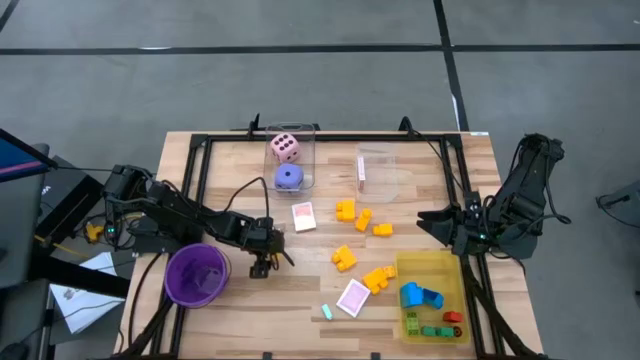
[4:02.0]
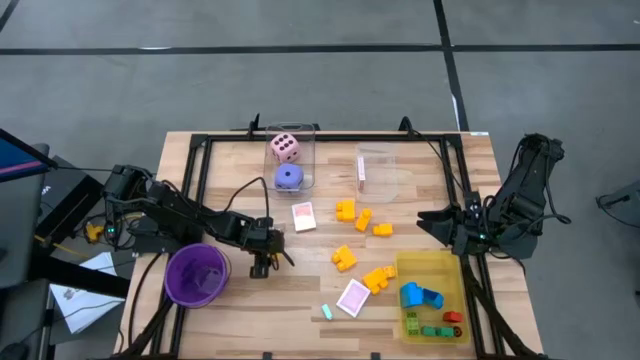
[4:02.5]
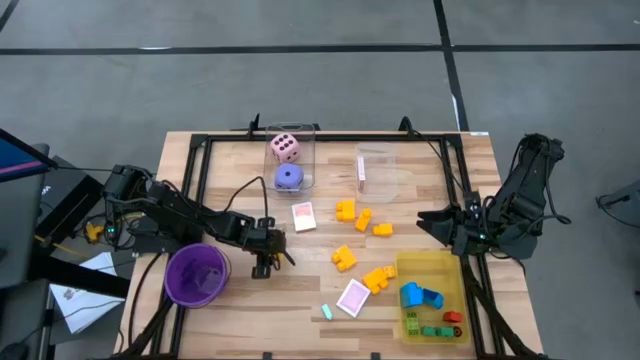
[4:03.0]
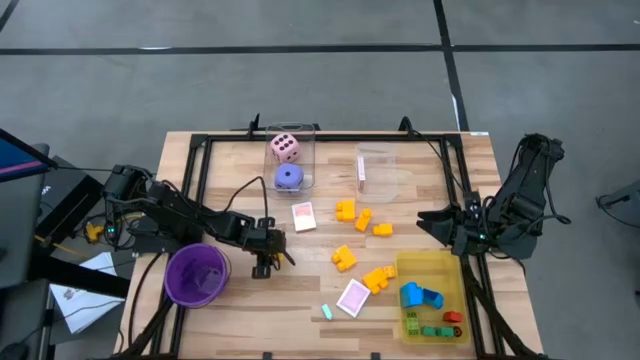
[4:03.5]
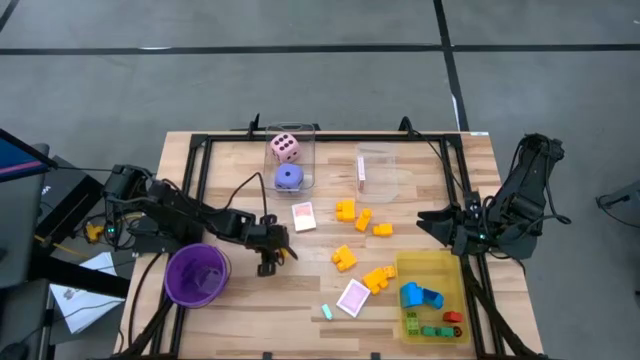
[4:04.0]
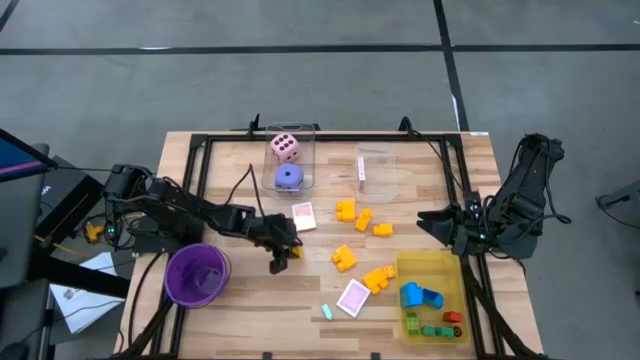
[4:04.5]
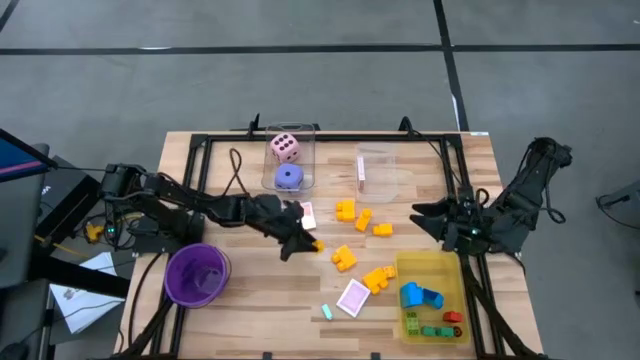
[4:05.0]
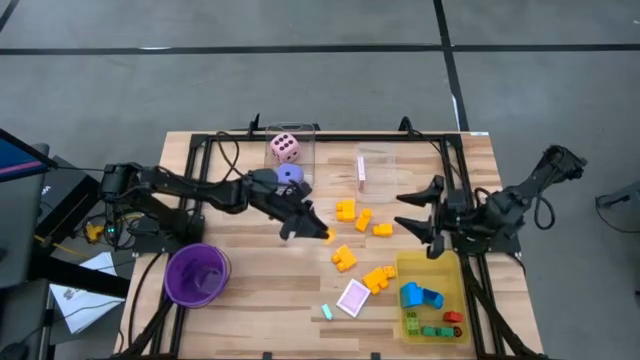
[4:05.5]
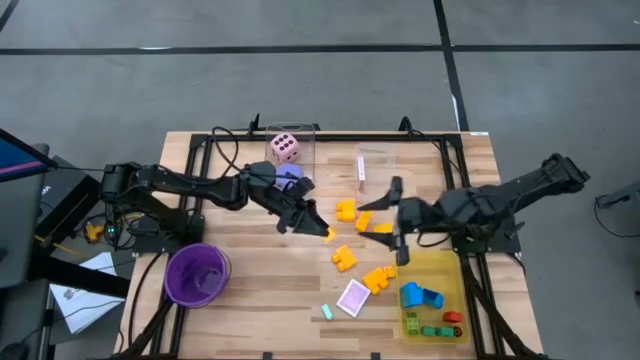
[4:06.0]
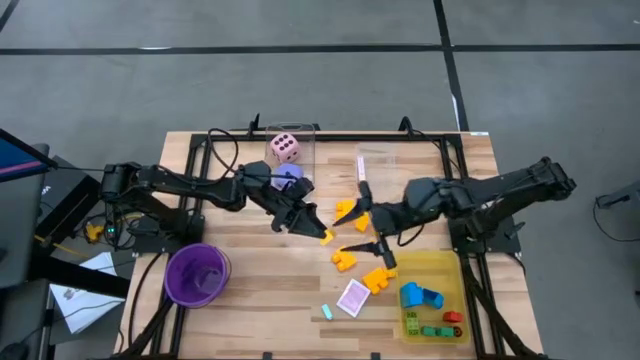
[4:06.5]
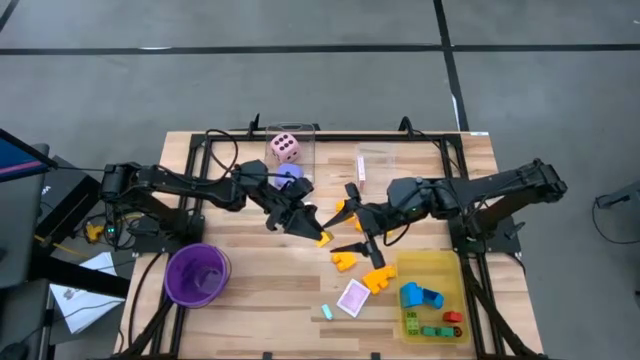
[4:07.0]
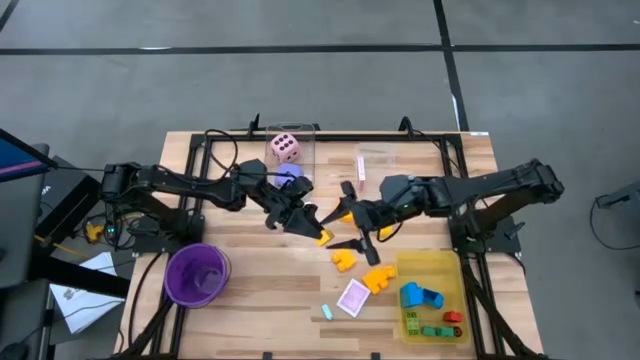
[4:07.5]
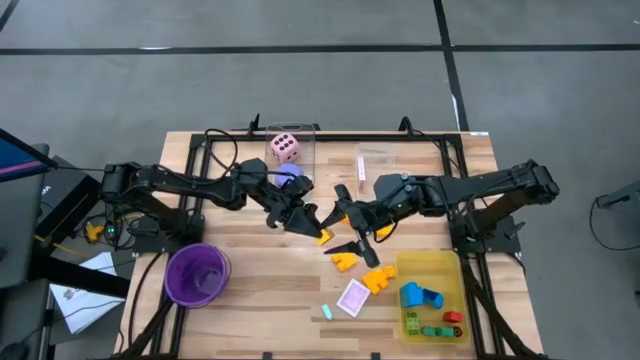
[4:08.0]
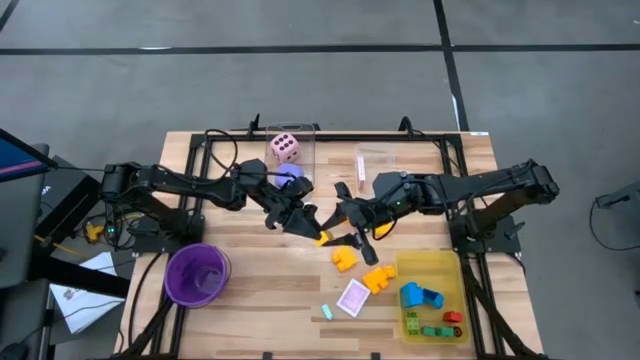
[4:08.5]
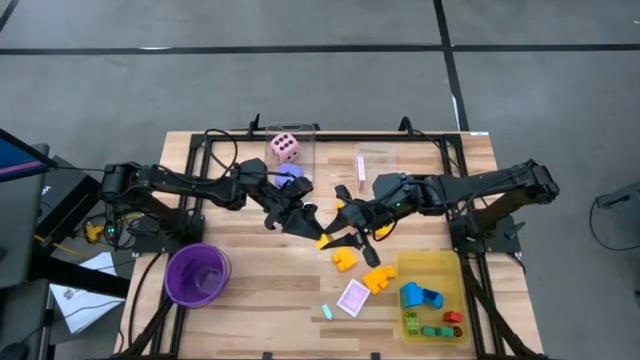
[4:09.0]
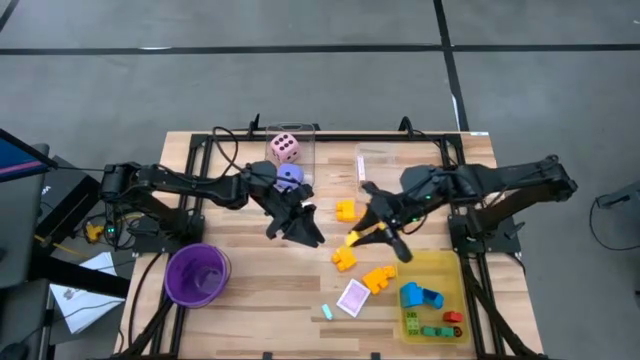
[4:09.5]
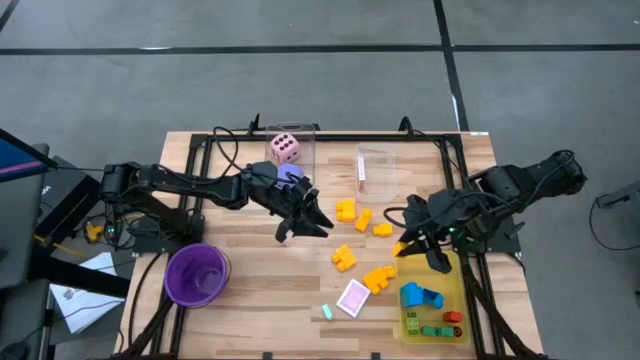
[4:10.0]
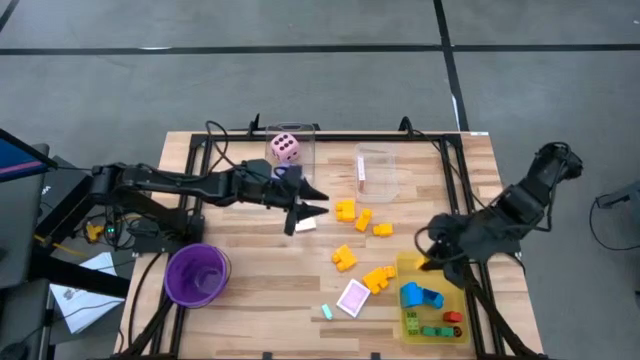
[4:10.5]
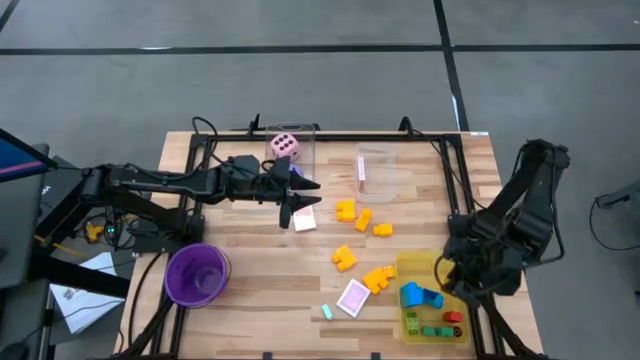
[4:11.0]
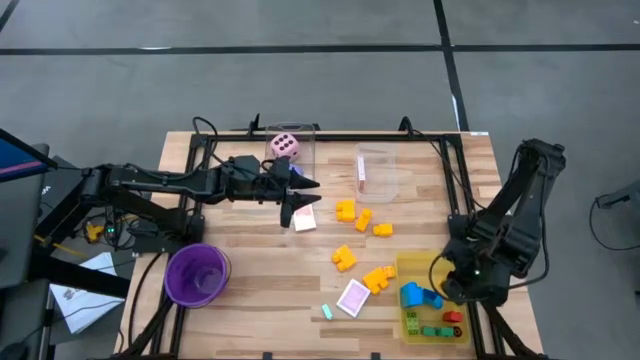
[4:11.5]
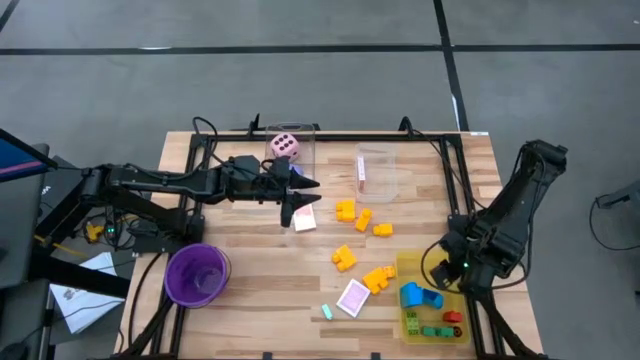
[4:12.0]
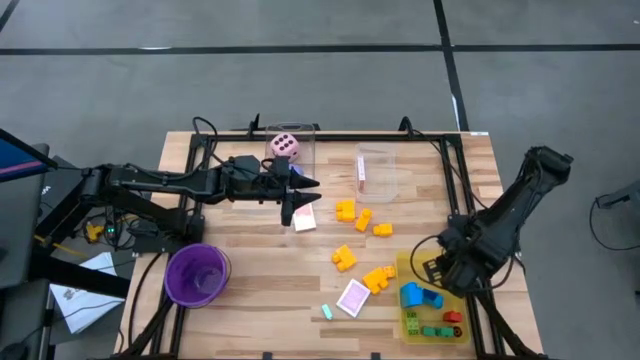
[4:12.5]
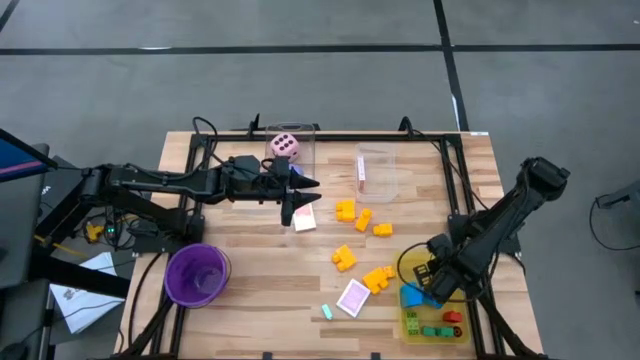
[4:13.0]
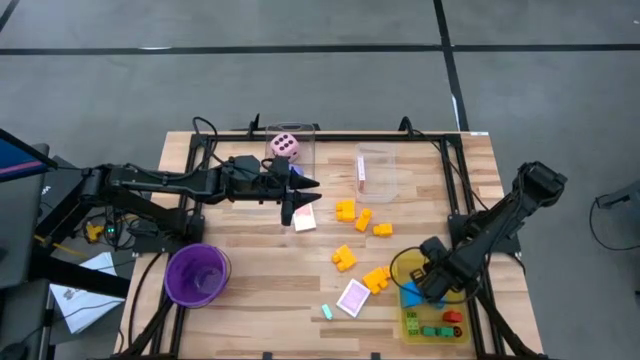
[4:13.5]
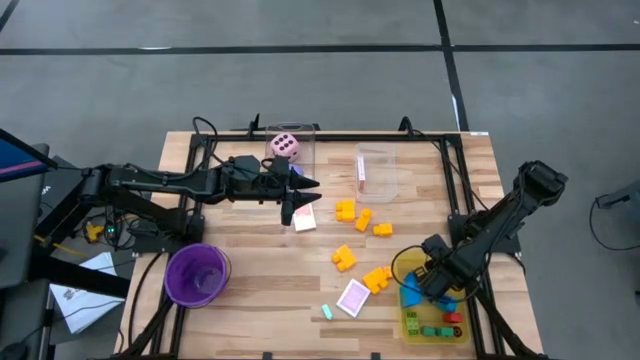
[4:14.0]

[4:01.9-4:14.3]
Task: Pick & Place Toys
Put the yellow game piece into the bin

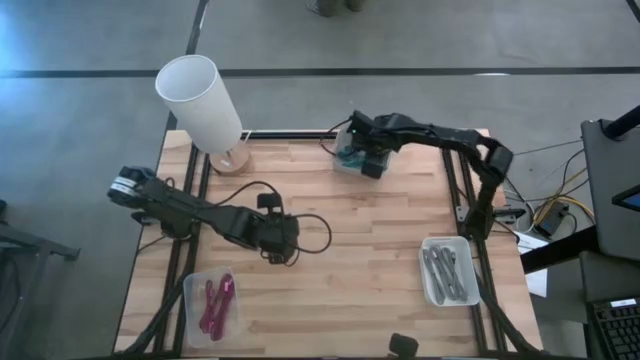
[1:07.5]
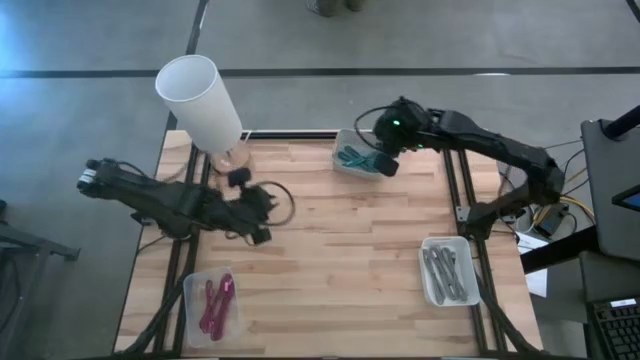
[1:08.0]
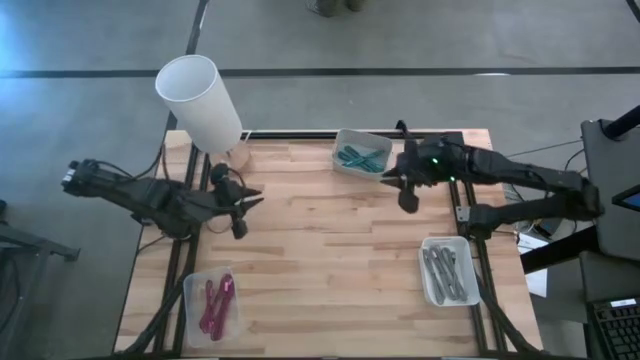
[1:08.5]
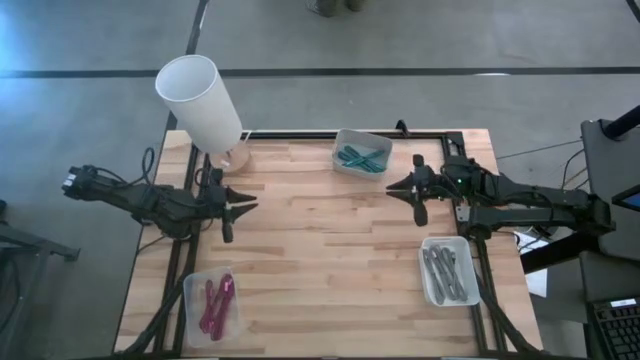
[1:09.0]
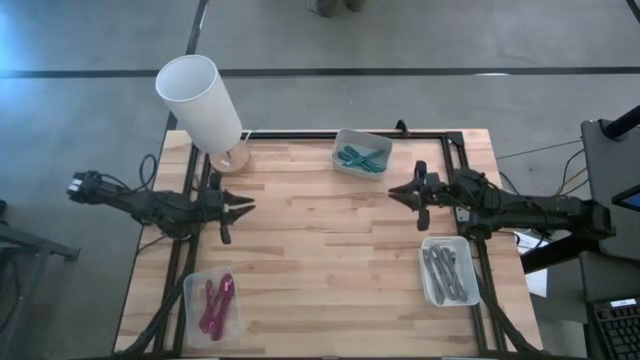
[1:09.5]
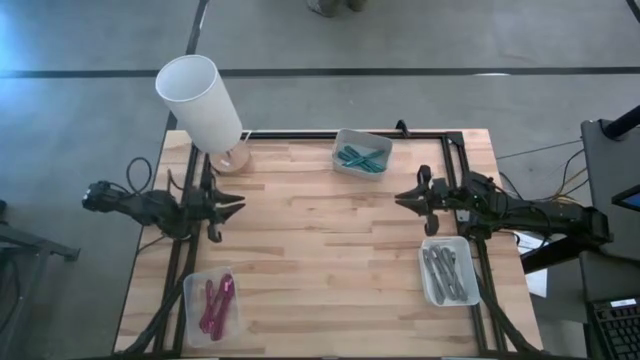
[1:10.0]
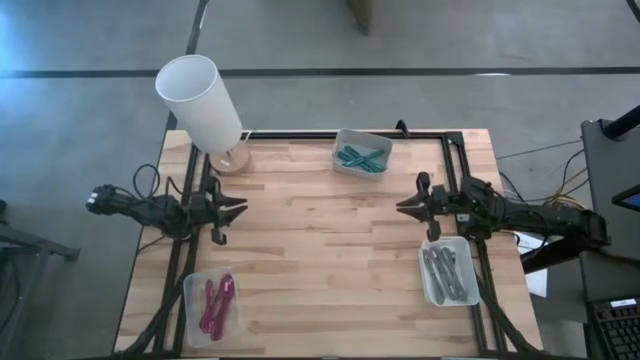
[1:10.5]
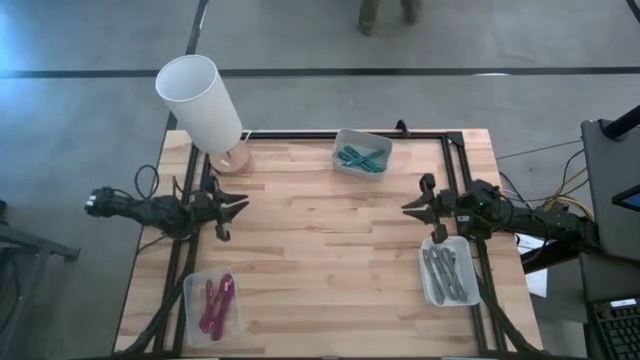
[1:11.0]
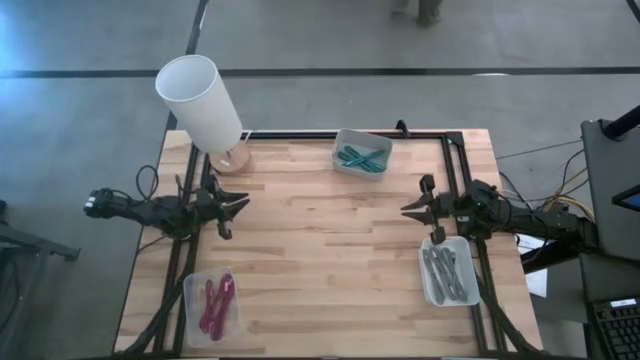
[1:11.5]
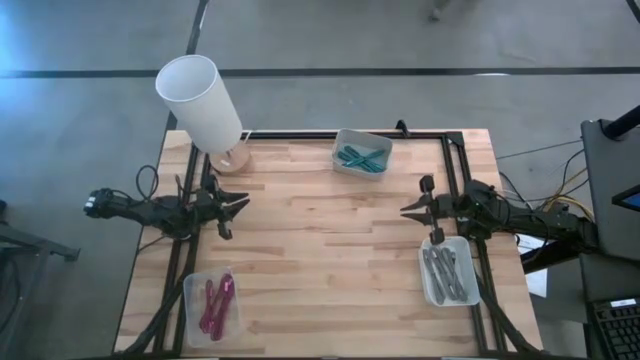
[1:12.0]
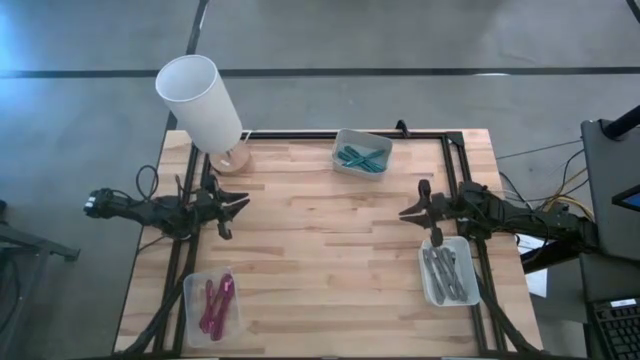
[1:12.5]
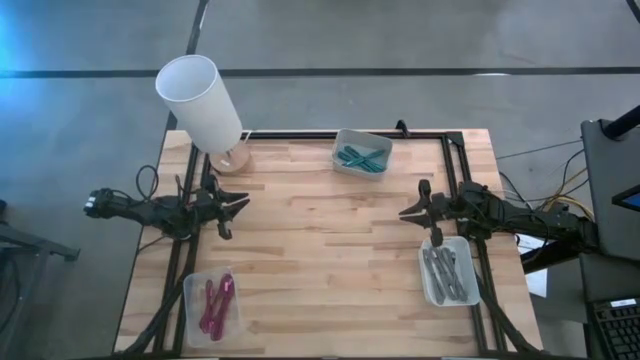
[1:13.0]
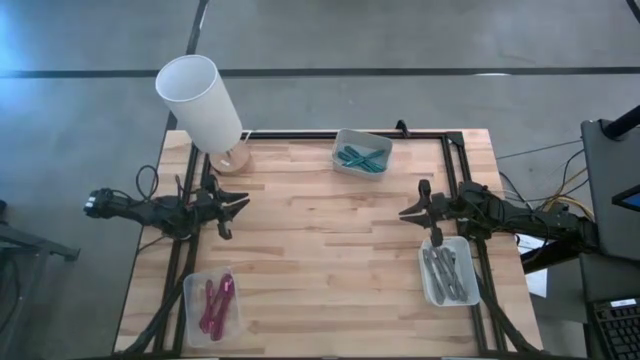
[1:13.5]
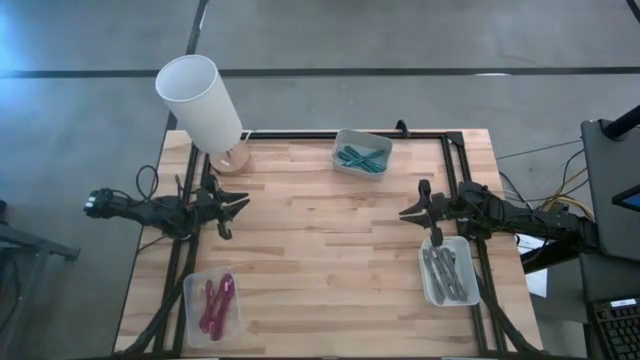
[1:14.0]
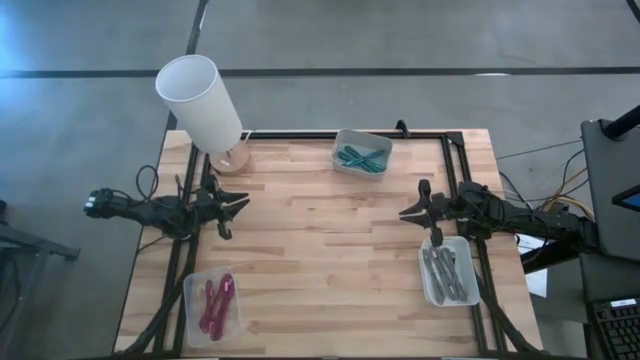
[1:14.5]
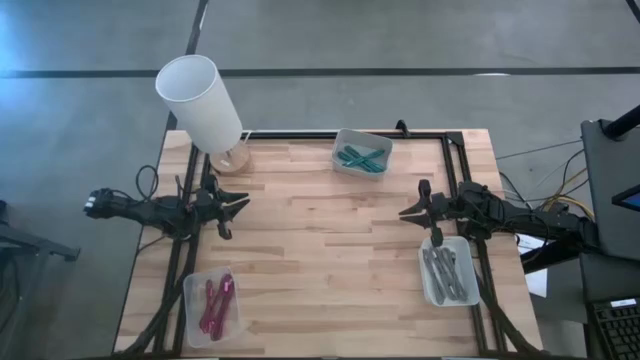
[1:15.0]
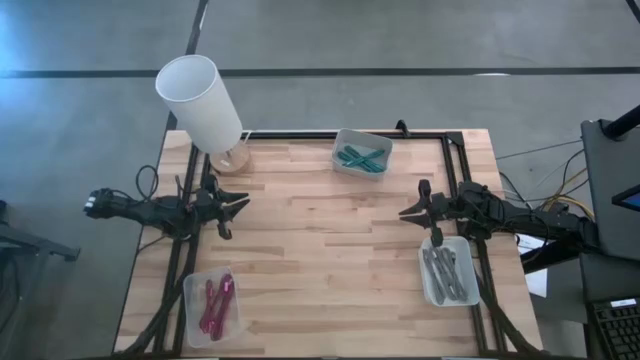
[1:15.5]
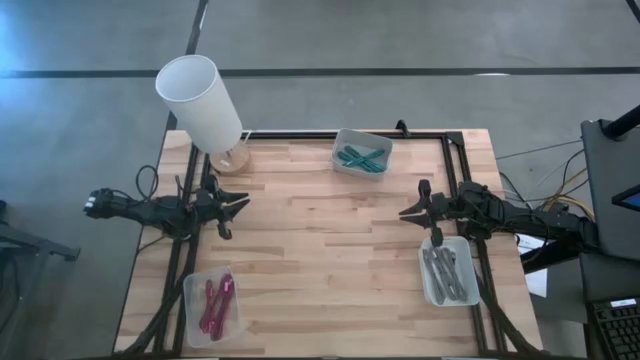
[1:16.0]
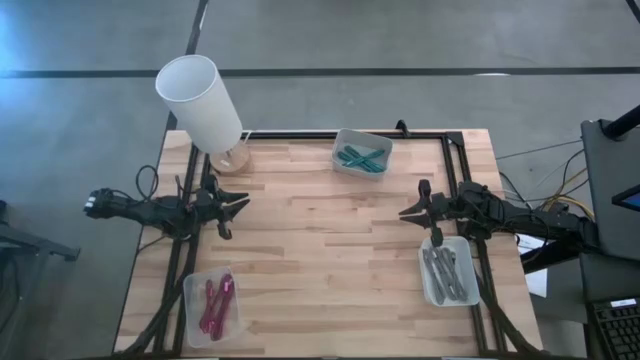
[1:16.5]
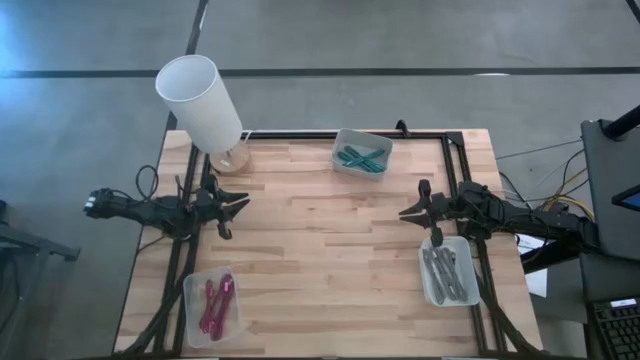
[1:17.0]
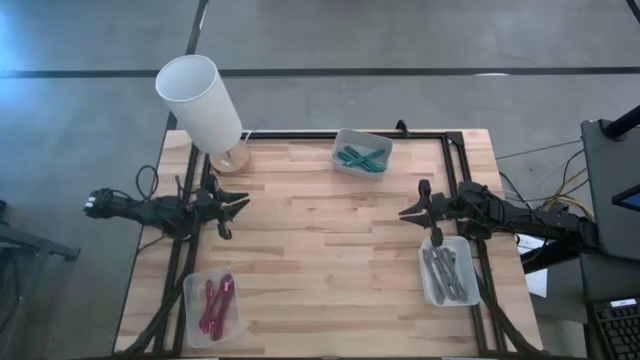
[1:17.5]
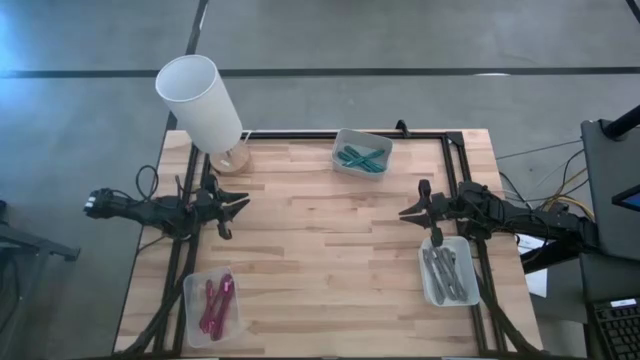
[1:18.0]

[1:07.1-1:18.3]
Task: Pick & Place USB Port
Return to Home Position
